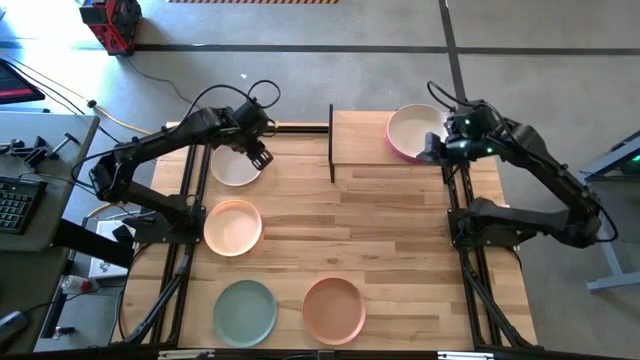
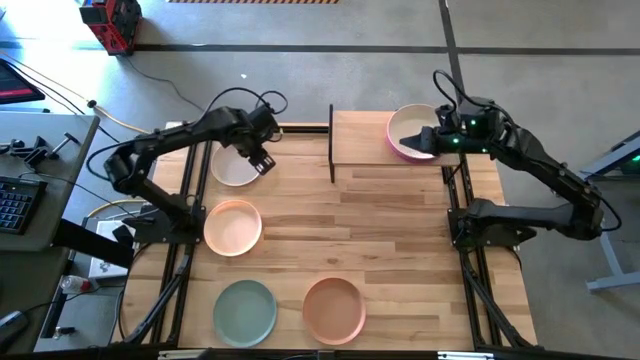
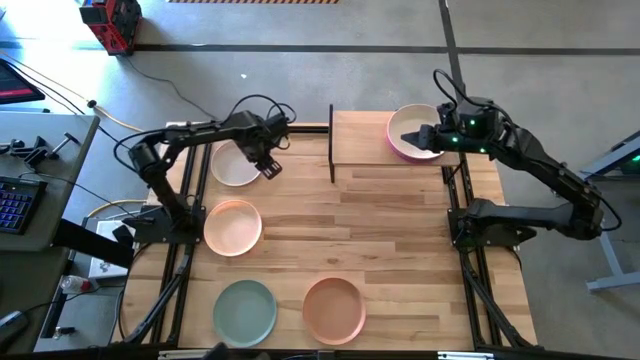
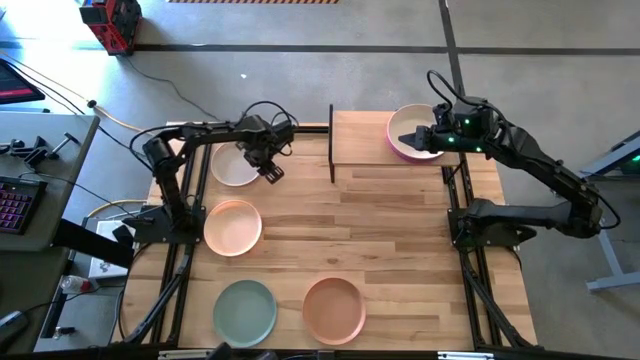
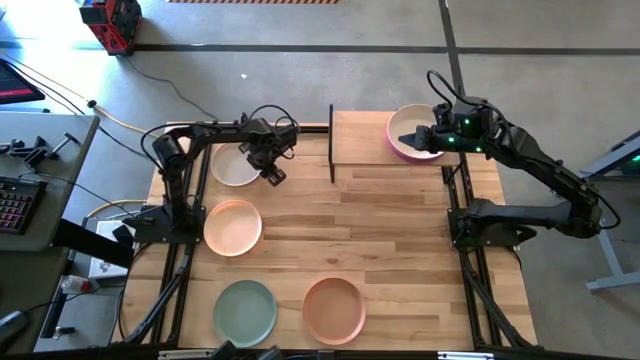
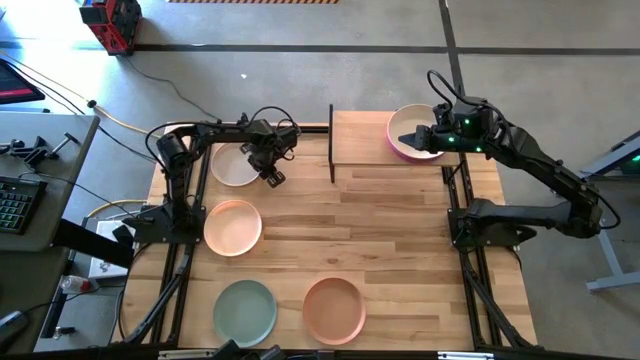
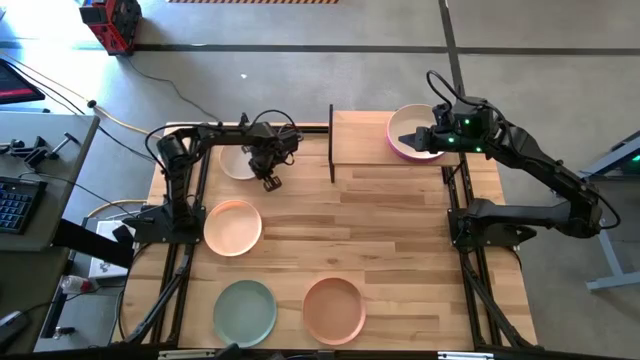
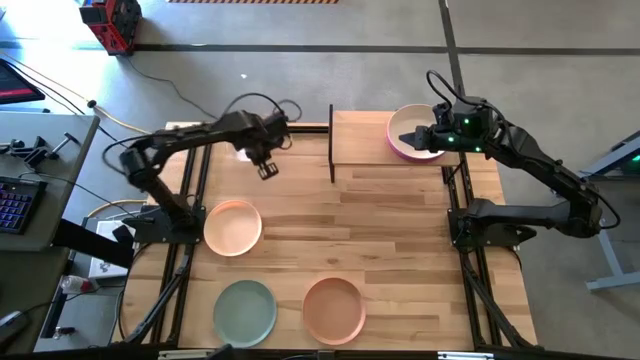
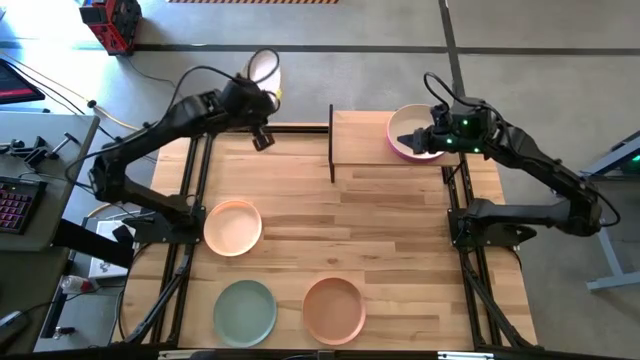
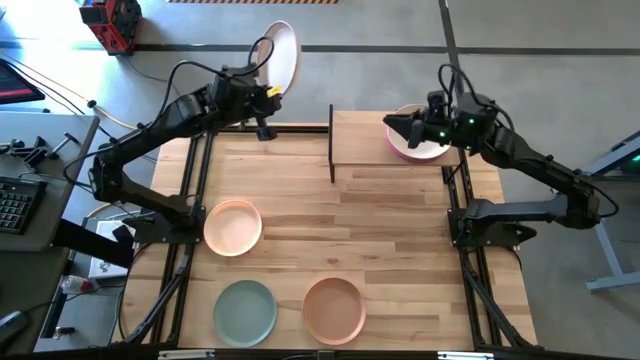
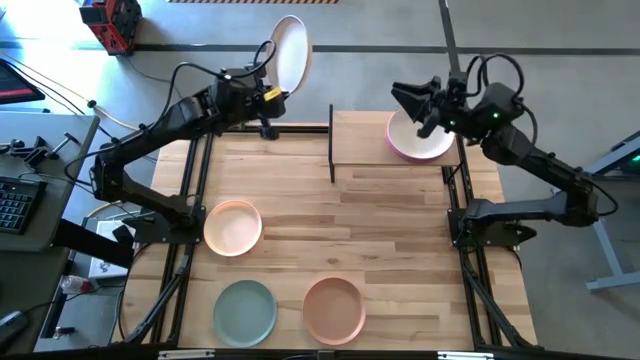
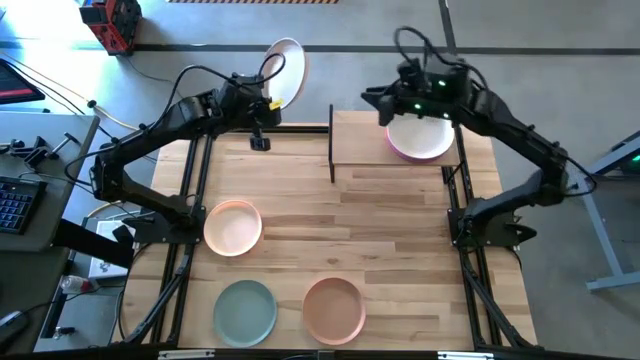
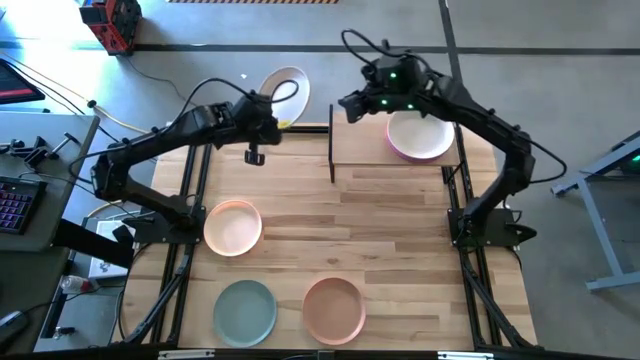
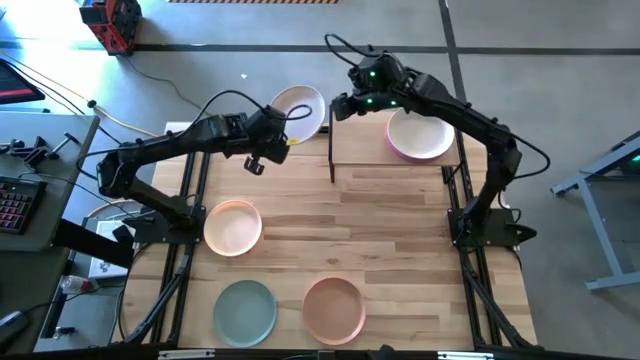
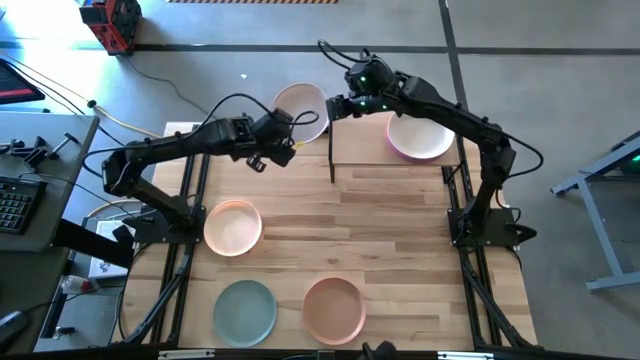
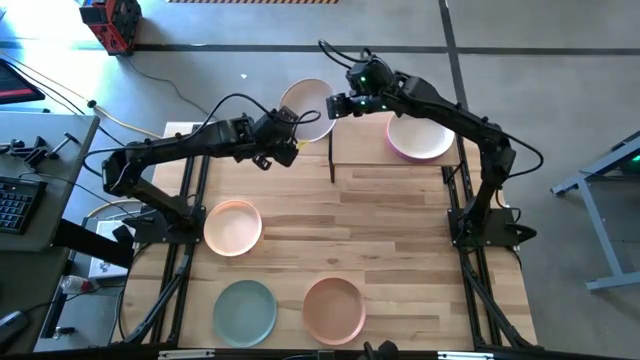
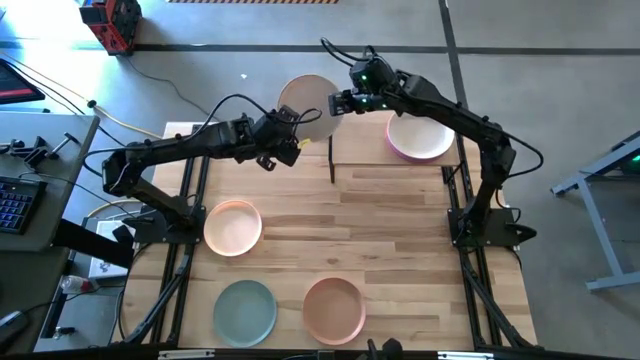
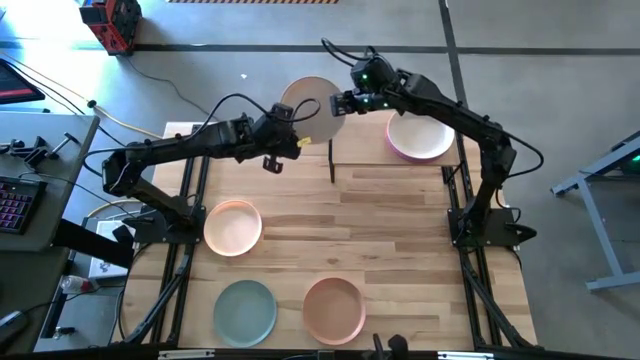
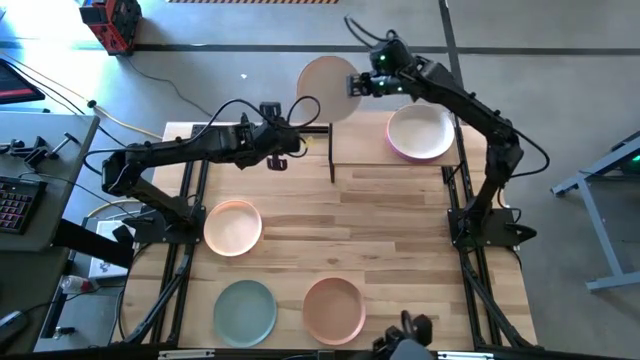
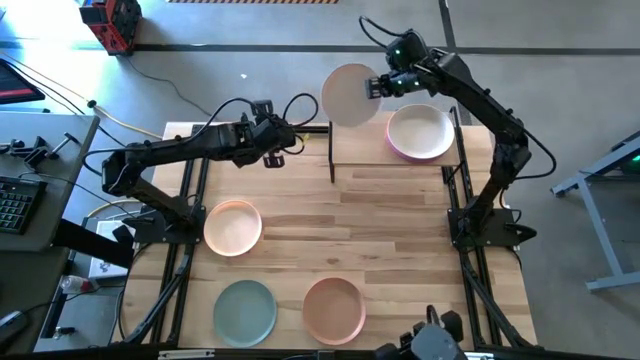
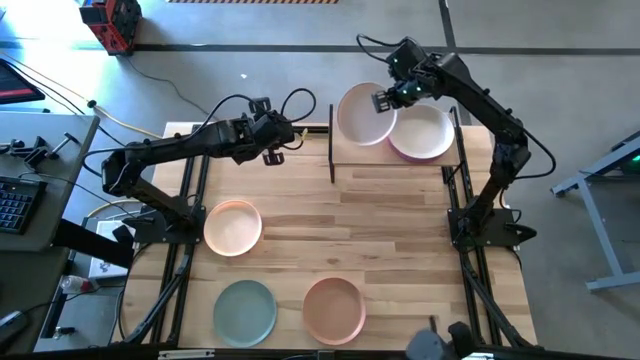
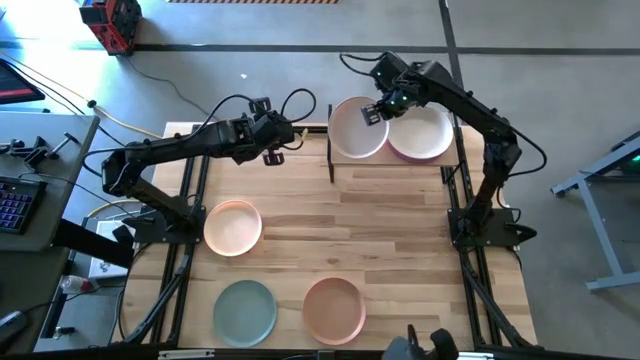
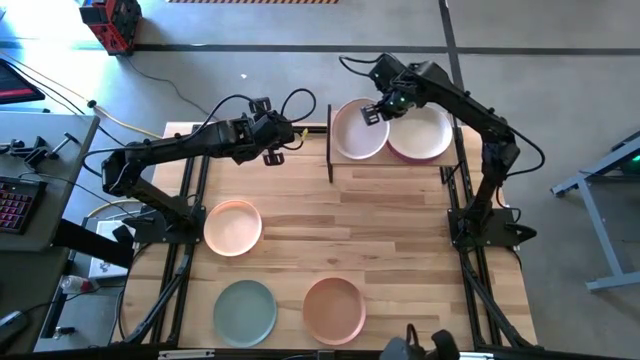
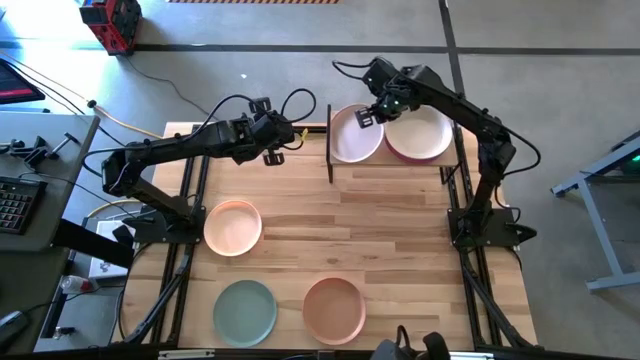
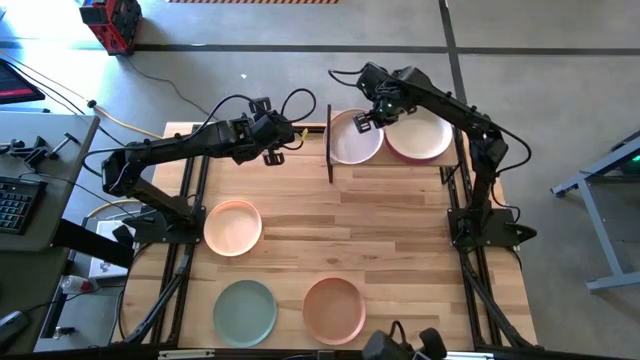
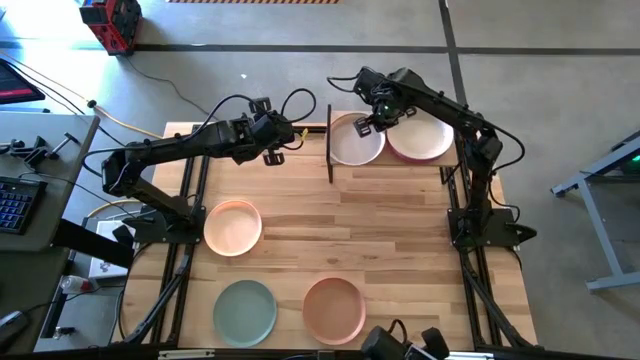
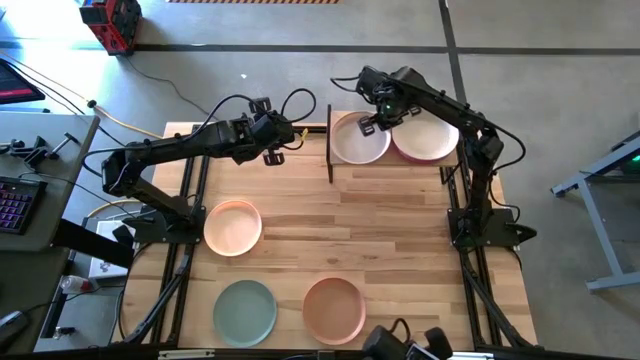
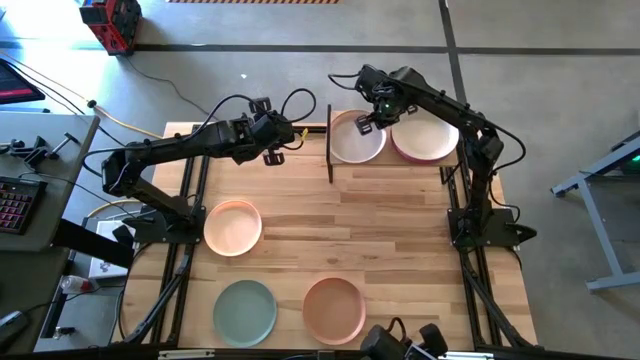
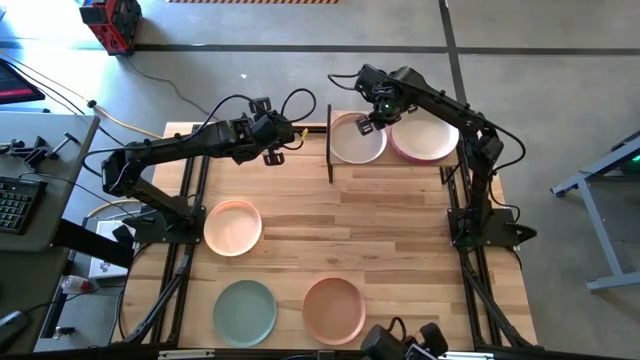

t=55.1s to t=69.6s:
Task: Place and stack plates onto a shelf
Put the white plate on the shelf

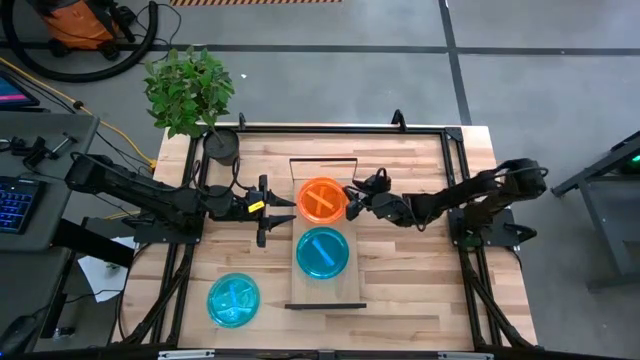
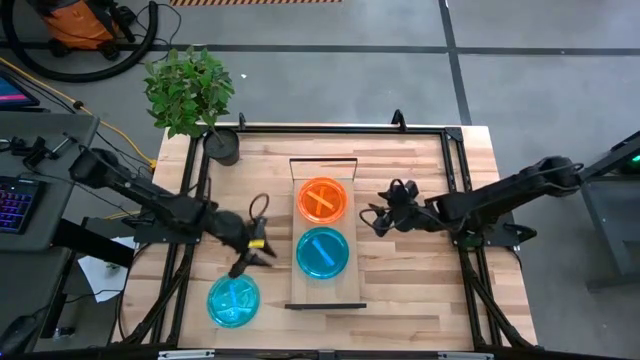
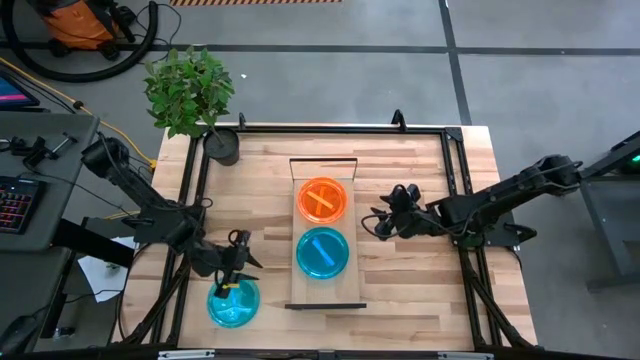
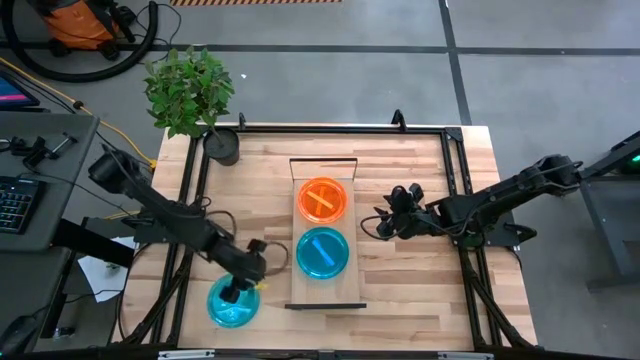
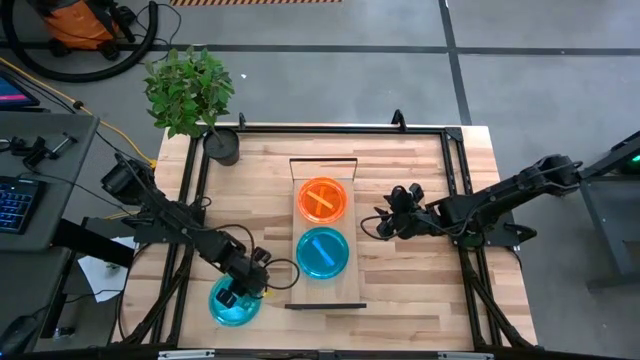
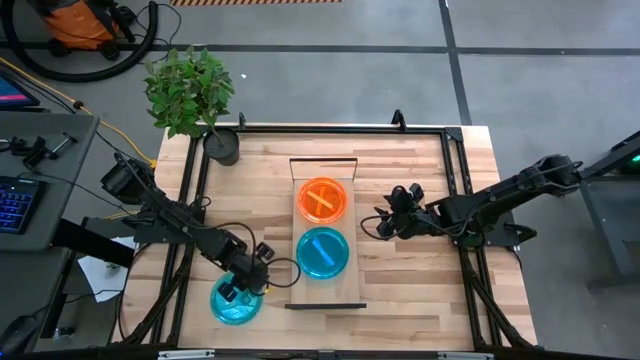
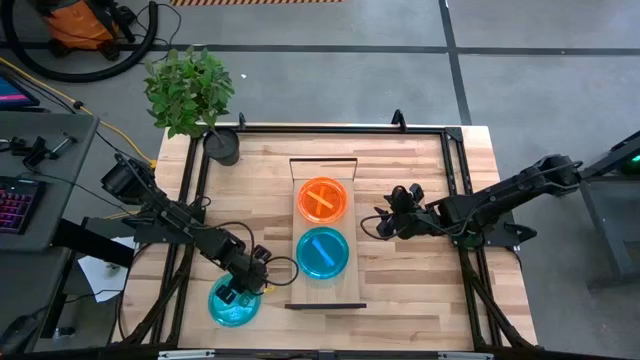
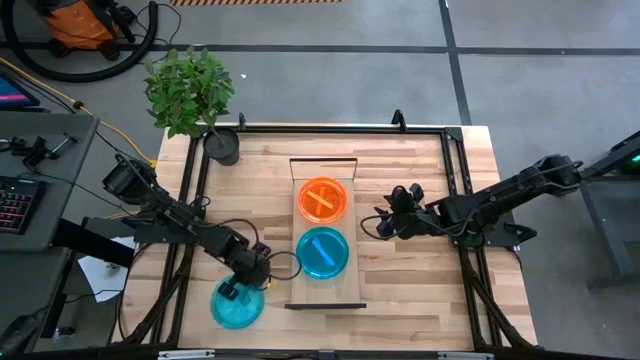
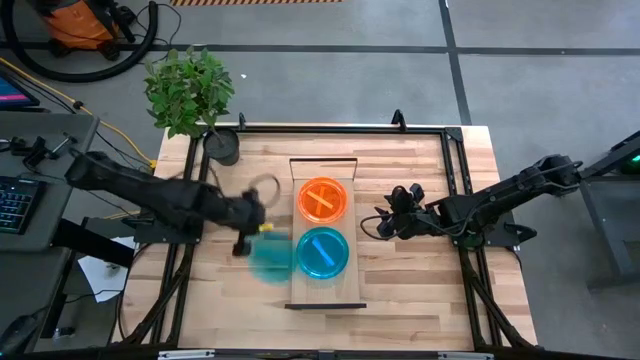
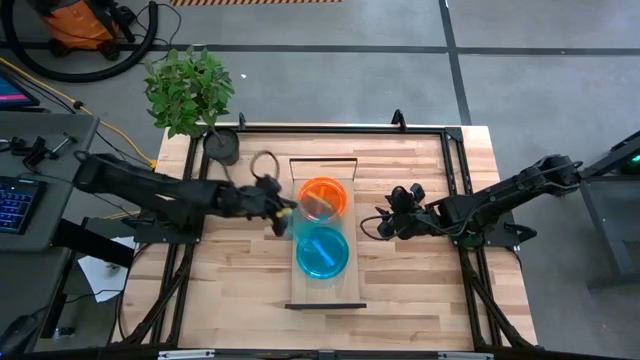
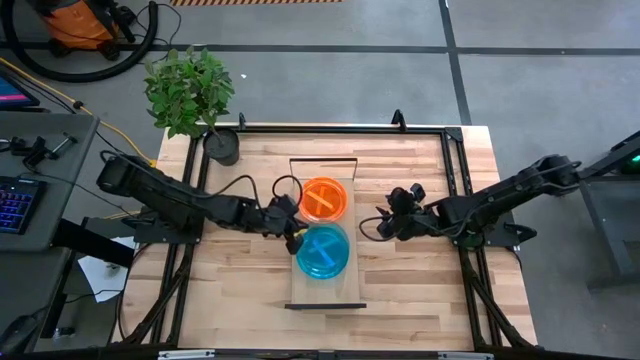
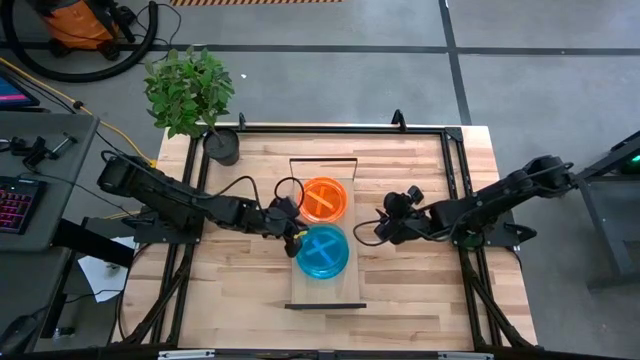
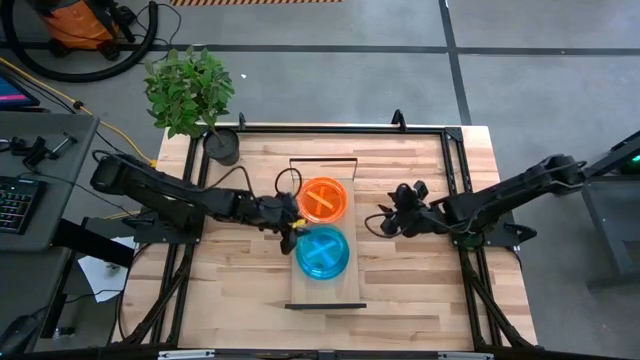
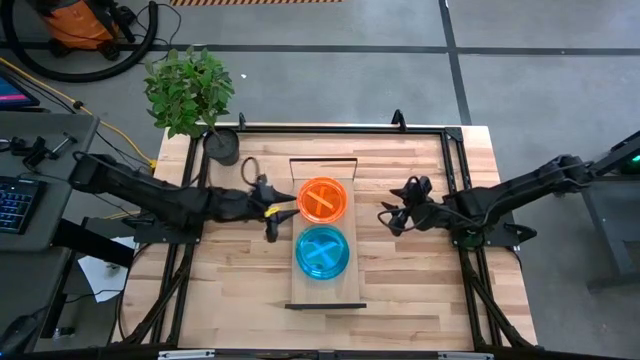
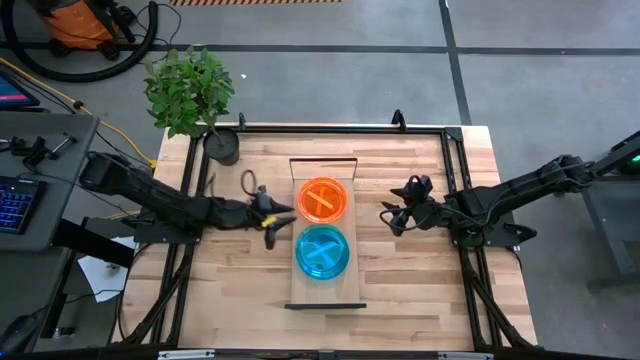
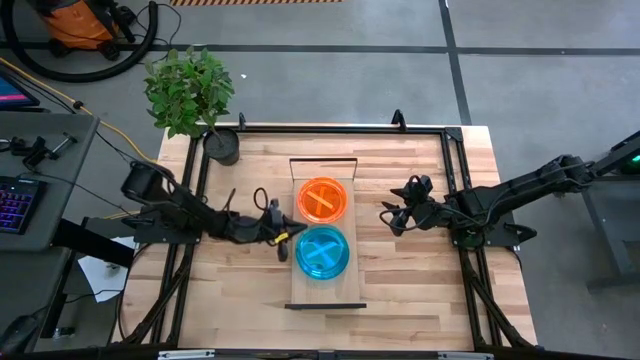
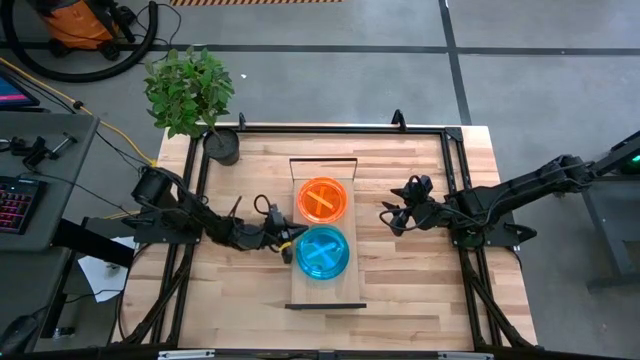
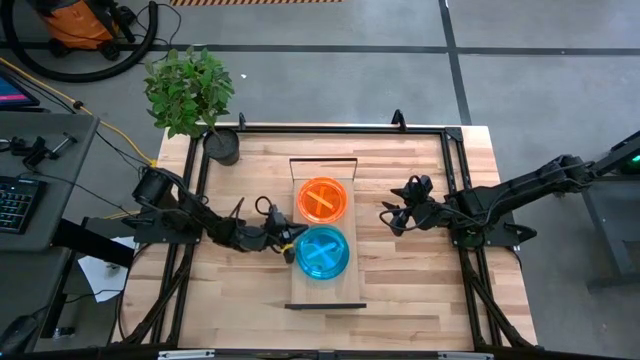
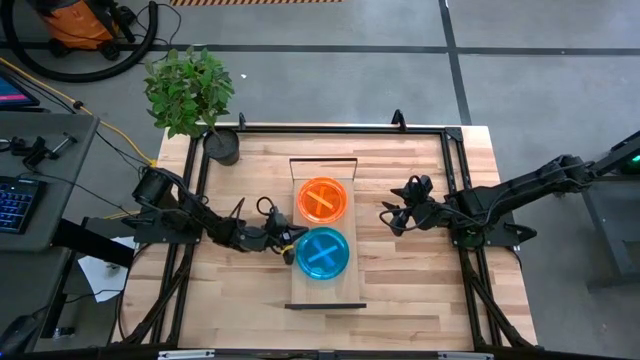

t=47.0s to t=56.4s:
Task: Place and stack plates onto a shelf
Stack the blue plate on top of the blue plate on the shelf
